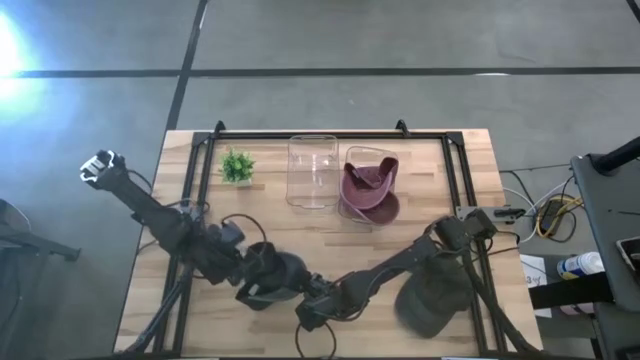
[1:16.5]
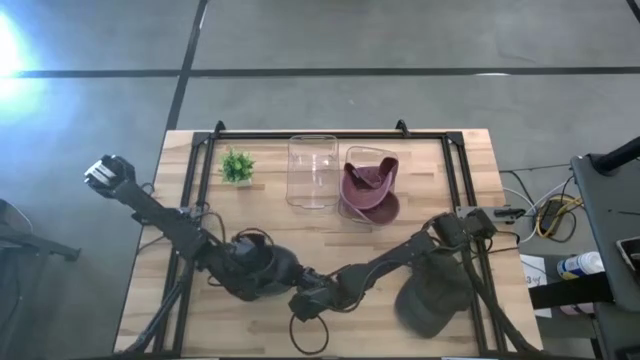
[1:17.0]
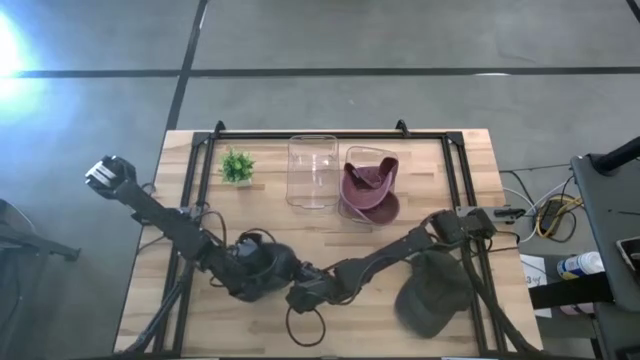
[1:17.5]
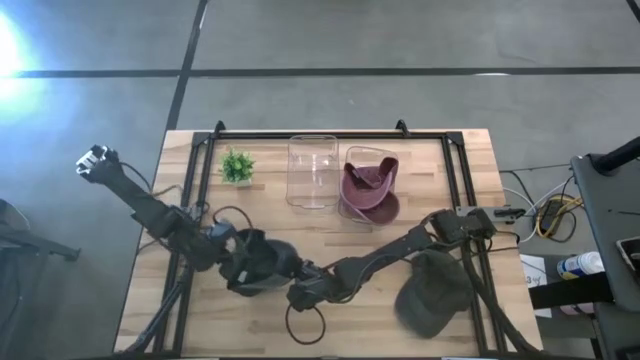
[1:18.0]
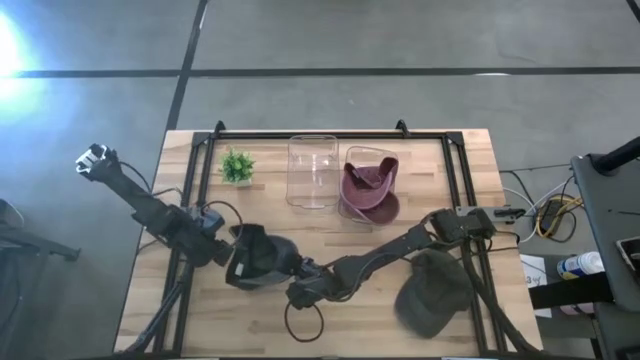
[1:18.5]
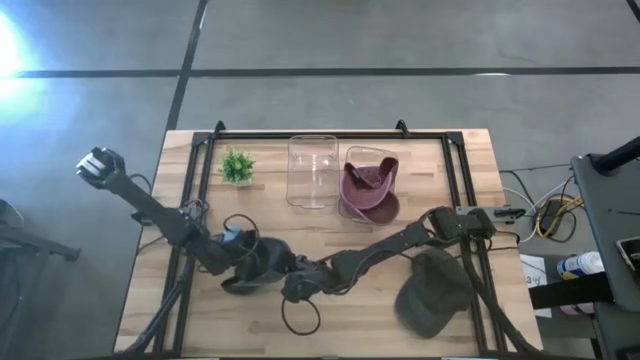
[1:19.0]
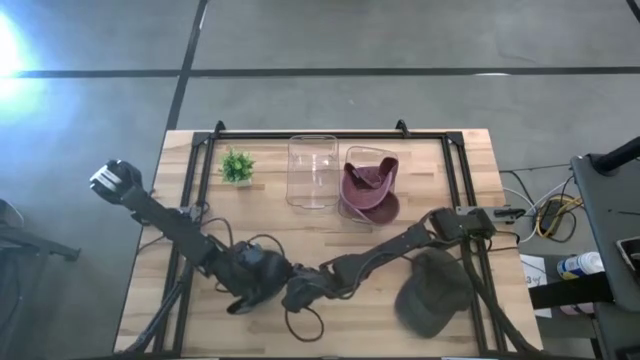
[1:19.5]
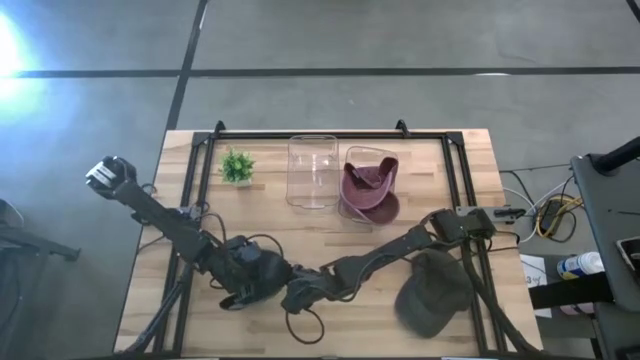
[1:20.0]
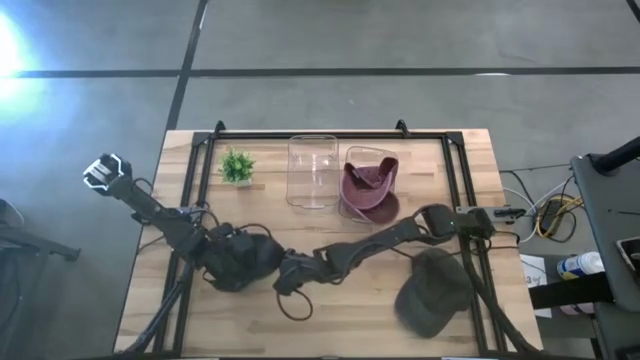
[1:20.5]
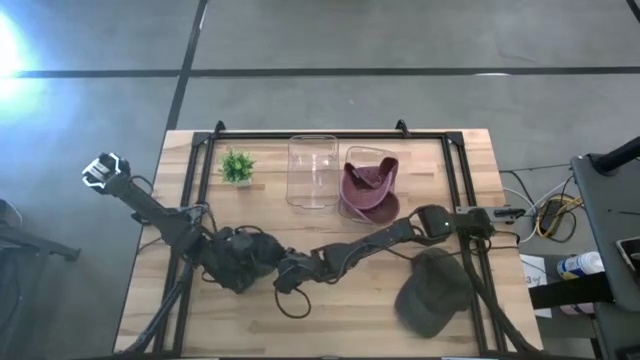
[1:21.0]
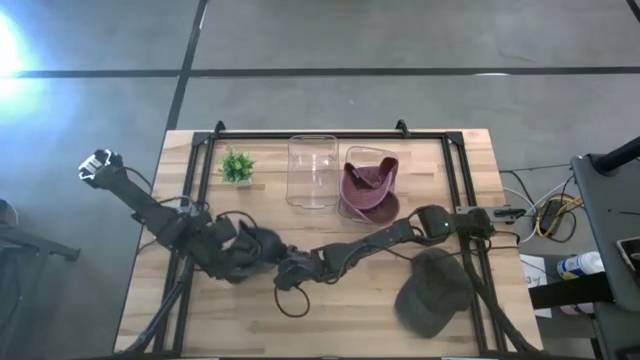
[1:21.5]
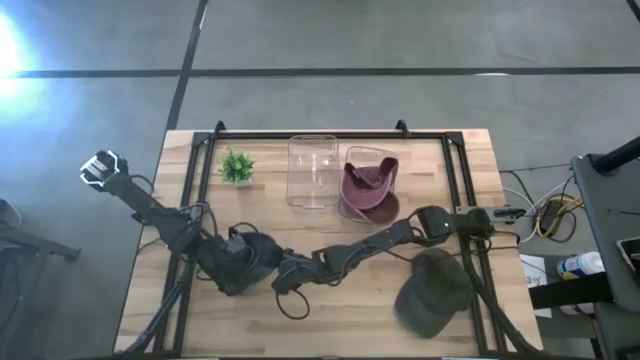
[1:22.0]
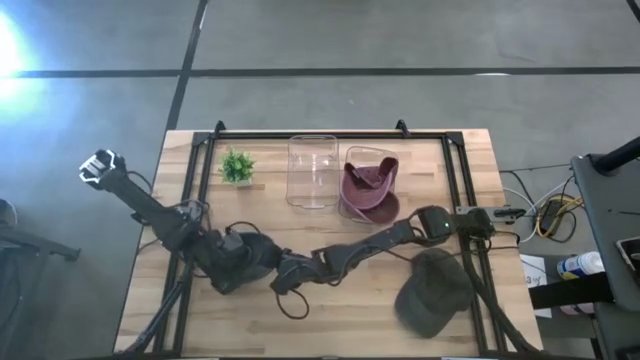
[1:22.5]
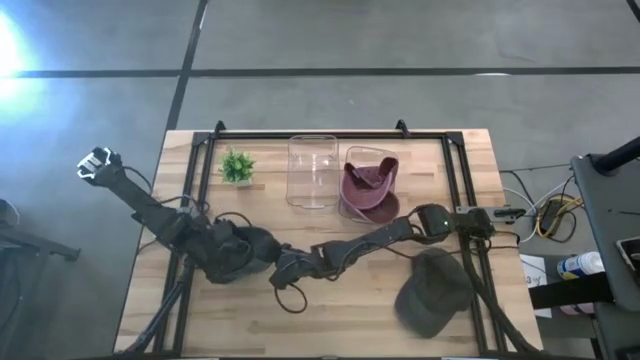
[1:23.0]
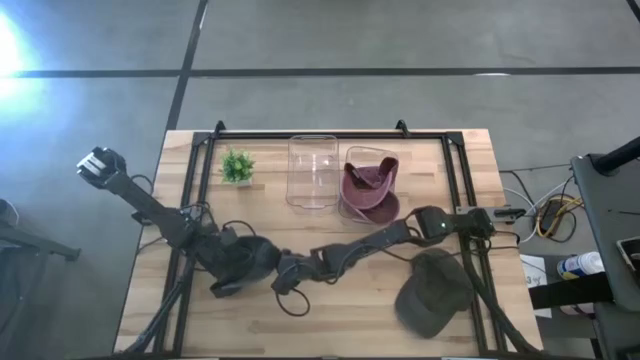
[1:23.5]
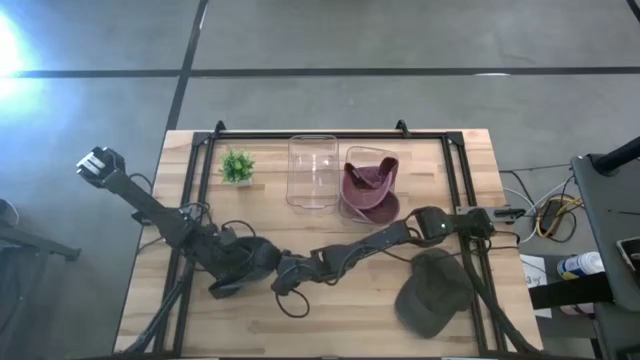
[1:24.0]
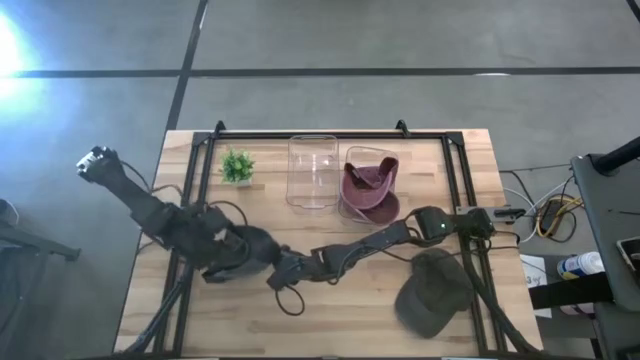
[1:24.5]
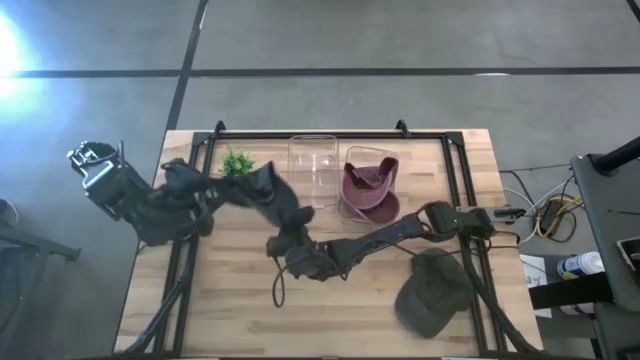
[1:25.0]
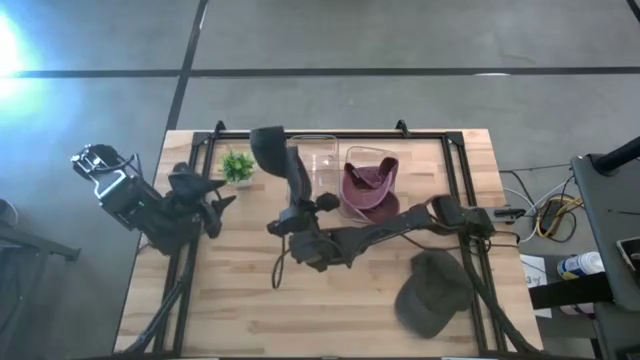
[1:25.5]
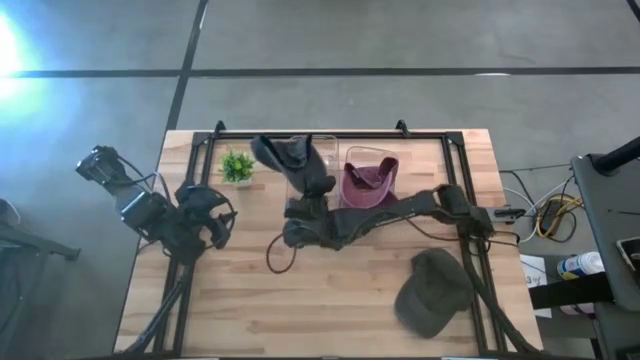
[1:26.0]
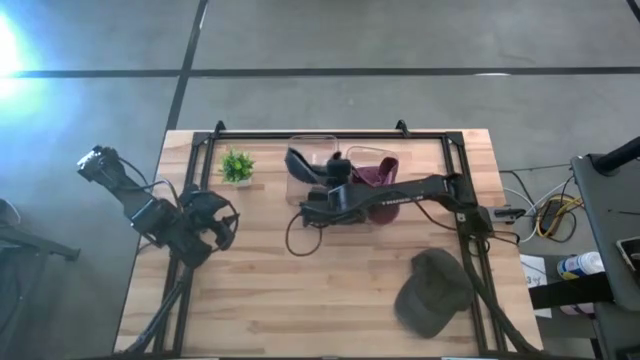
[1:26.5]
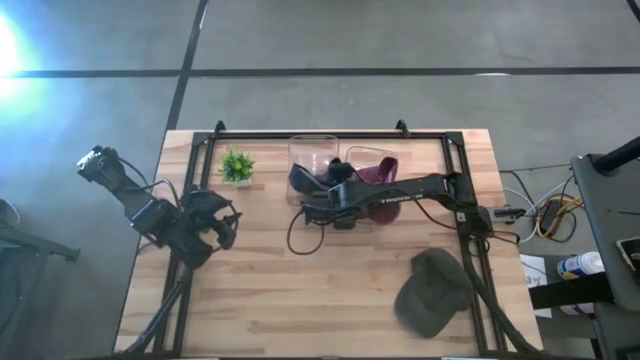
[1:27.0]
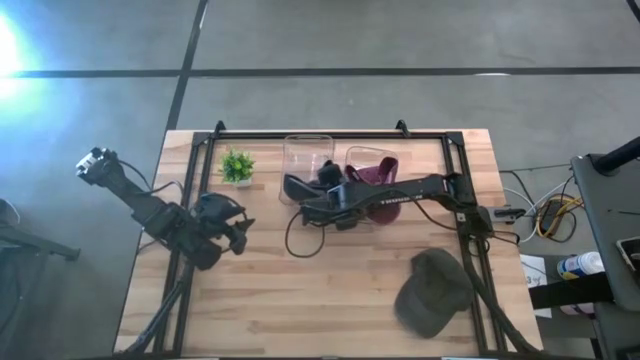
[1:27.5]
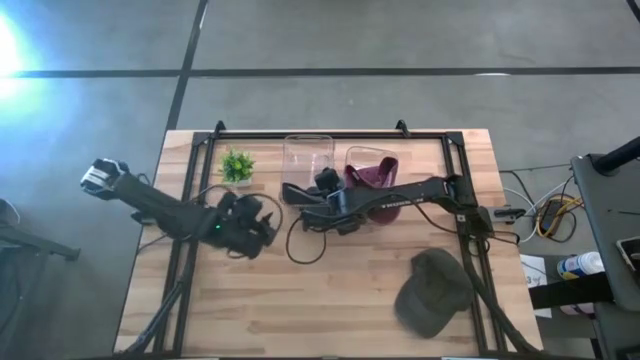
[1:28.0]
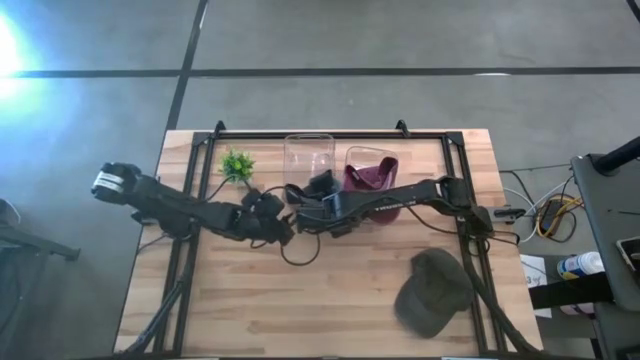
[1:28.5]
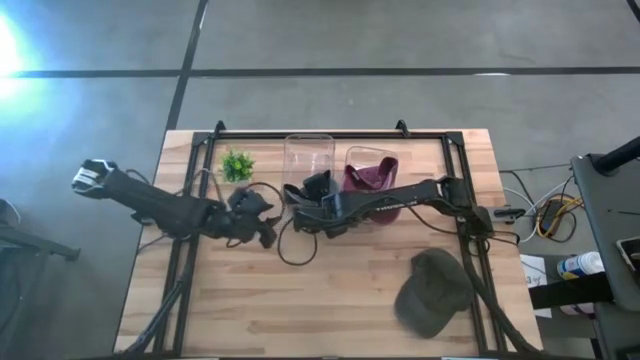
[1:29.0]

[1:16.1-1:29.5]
Task: Pick & Place hat
Put the left black cap into the left transparent bin

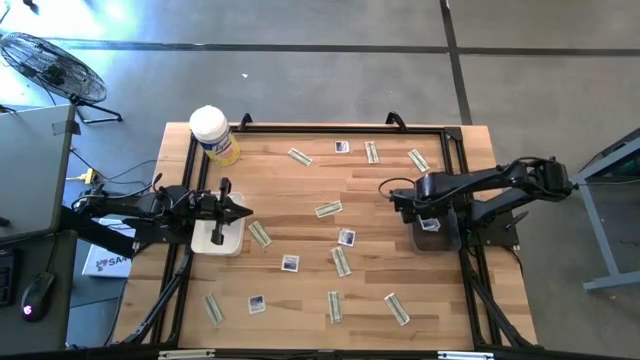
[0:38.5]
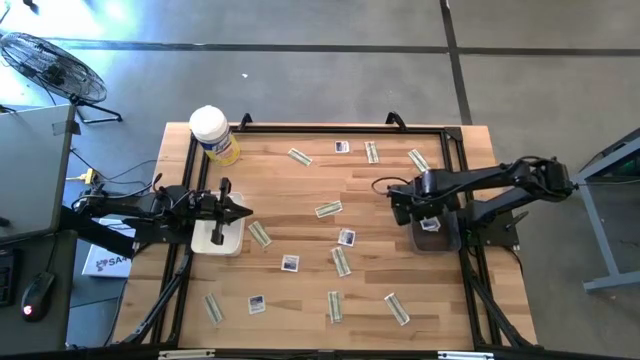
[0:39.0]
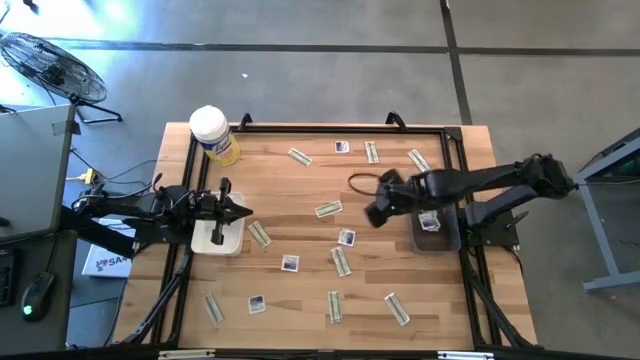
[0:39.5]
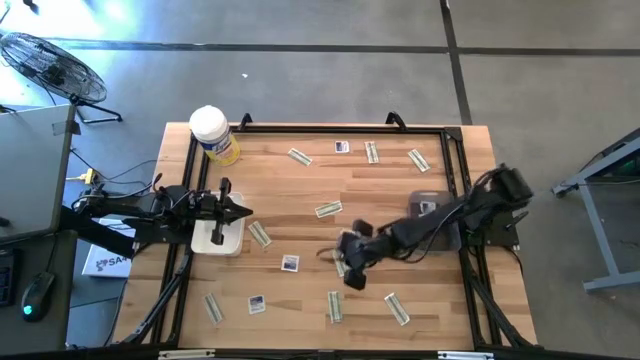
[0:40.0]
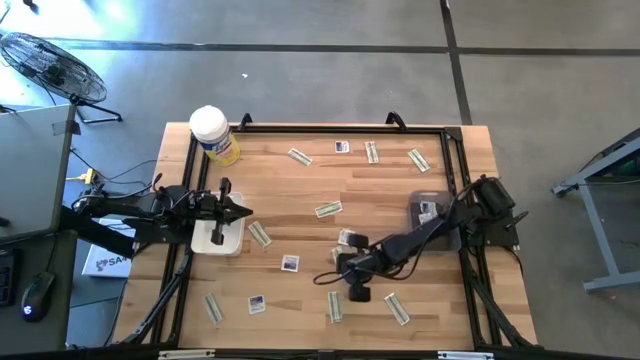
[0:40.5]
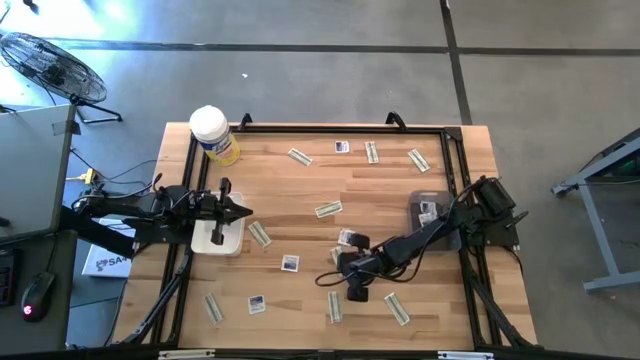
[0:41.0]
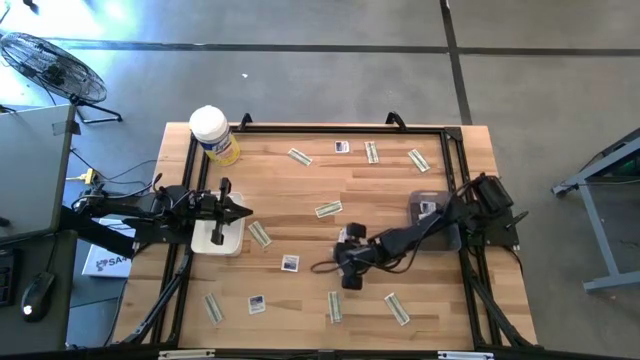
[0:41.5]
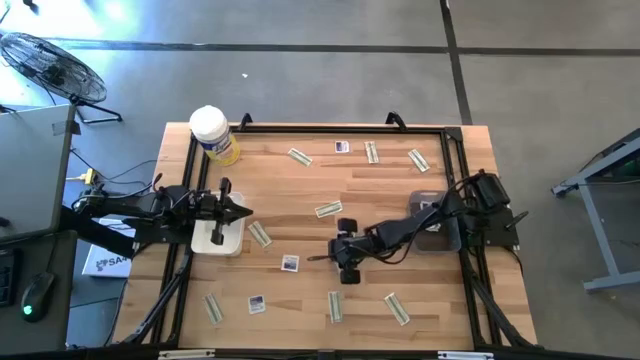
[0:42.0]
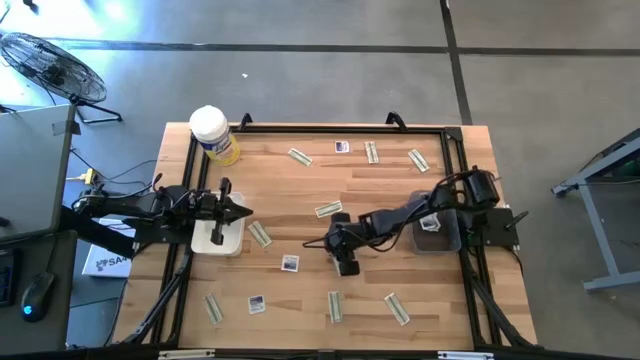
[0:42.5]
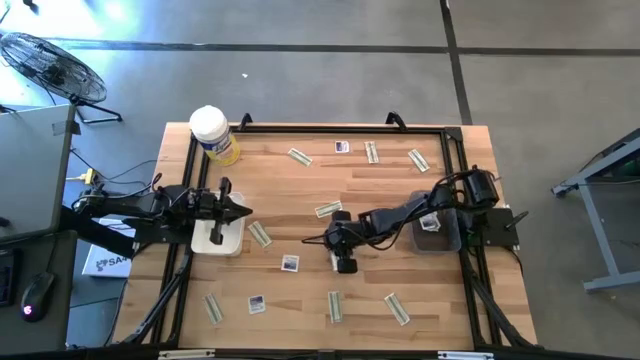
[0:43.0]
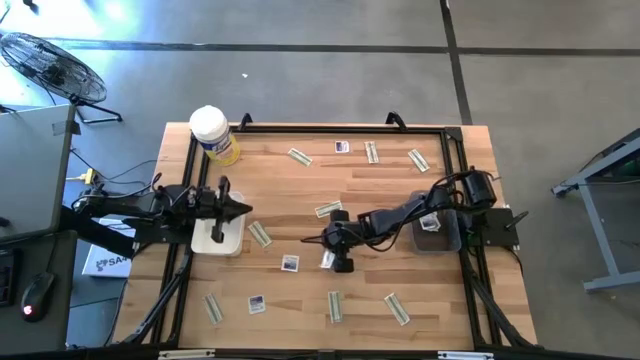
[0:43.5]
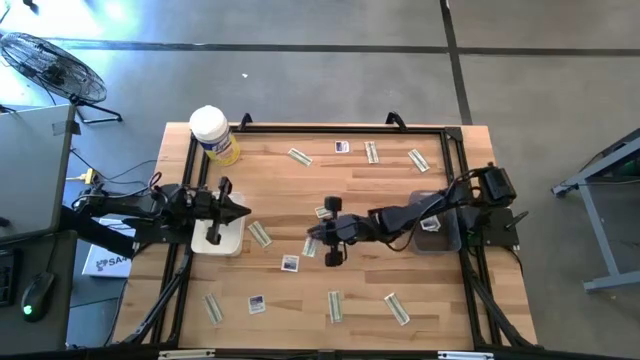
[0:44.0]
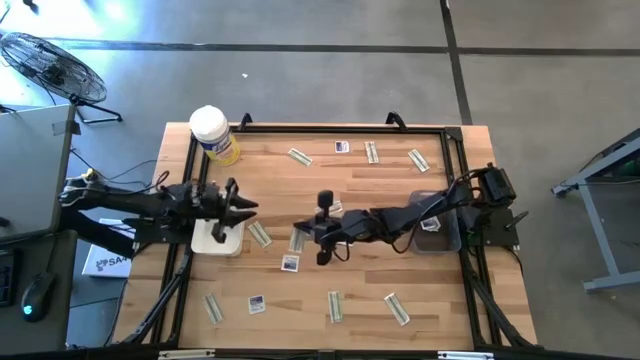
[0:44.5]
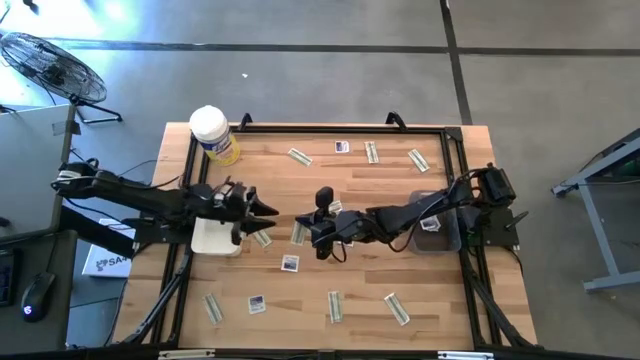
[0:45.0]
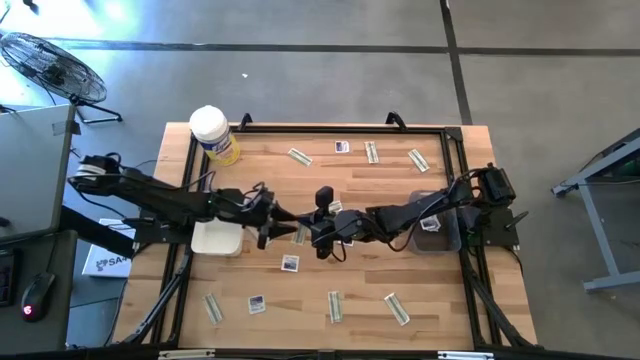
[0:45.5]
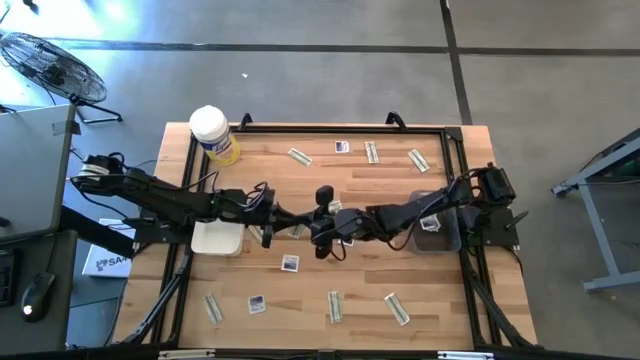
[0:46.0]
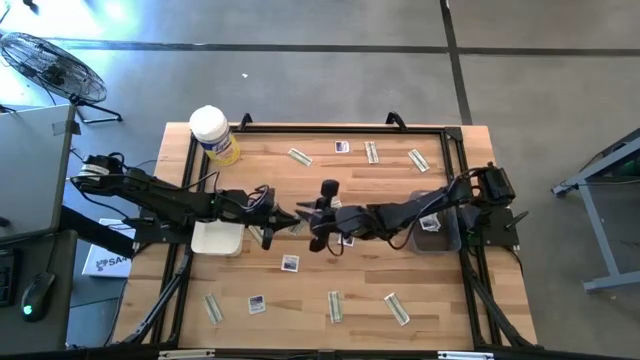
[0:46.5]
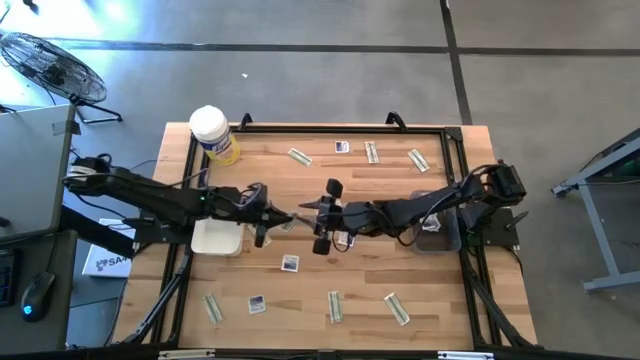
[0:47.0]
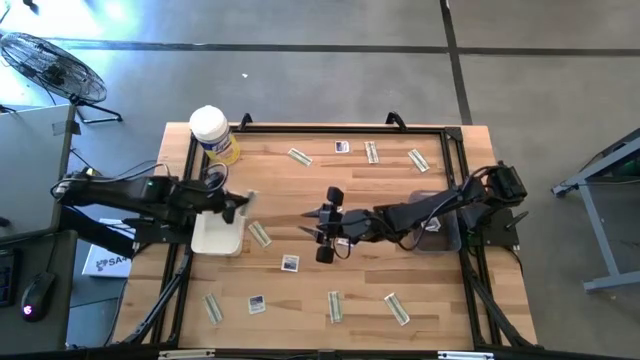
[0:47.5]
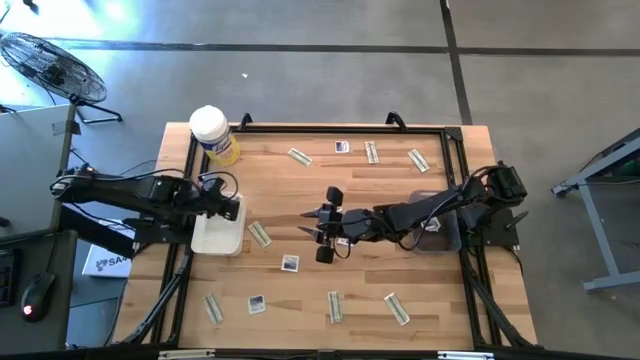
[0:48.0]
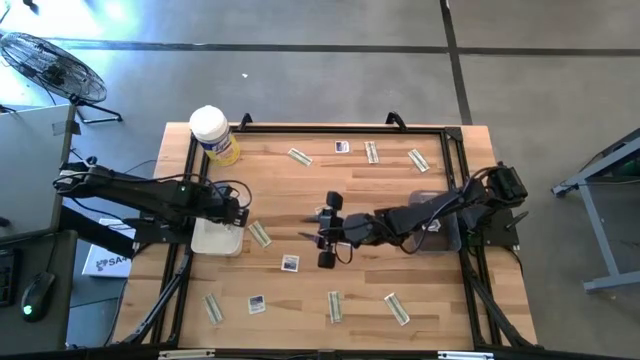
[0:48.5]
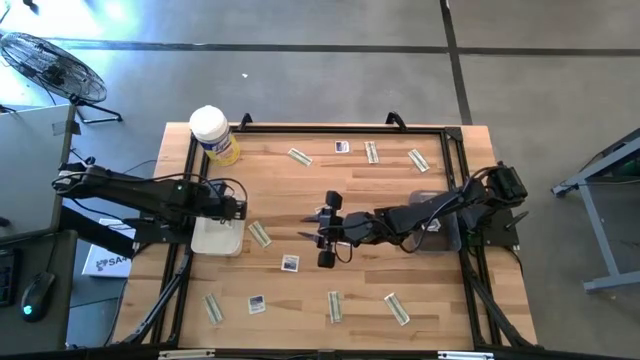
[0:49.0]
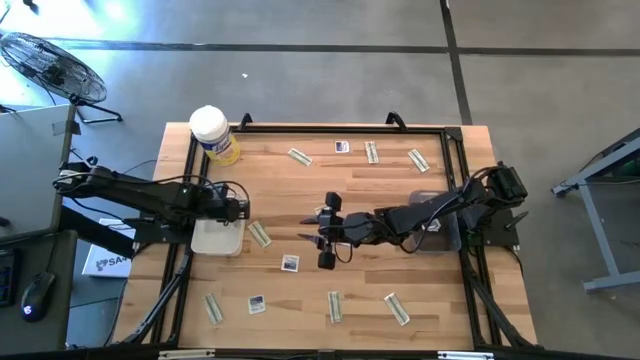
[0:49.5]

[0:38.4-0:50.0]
Task: Pick & Place First Aid Supplies
Put the green bandage into the white bin
